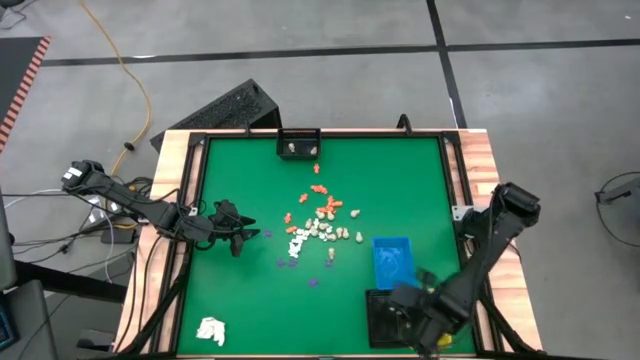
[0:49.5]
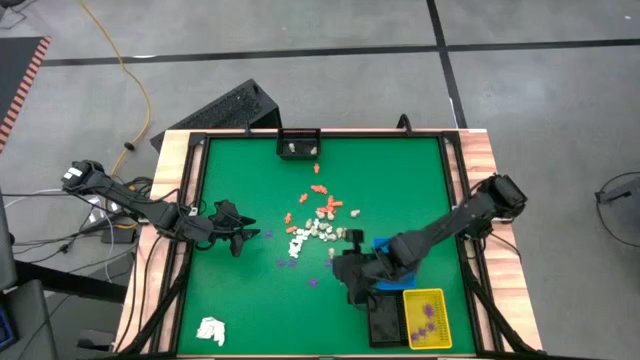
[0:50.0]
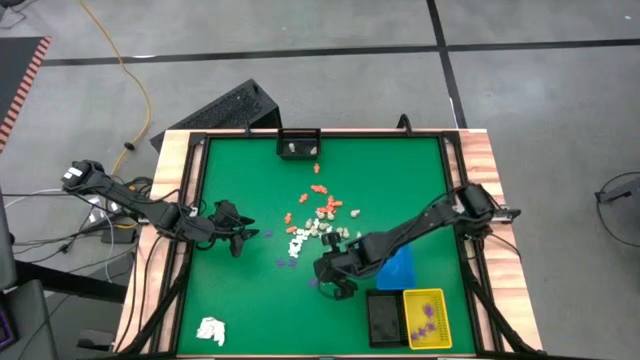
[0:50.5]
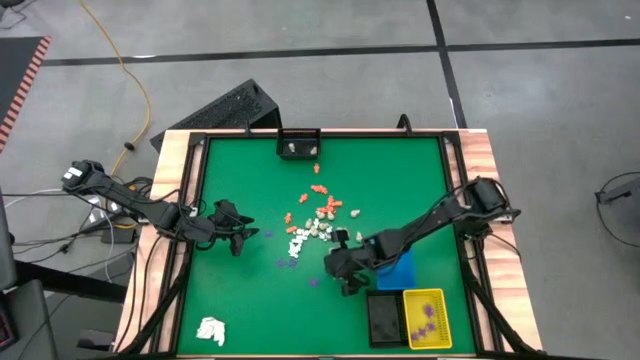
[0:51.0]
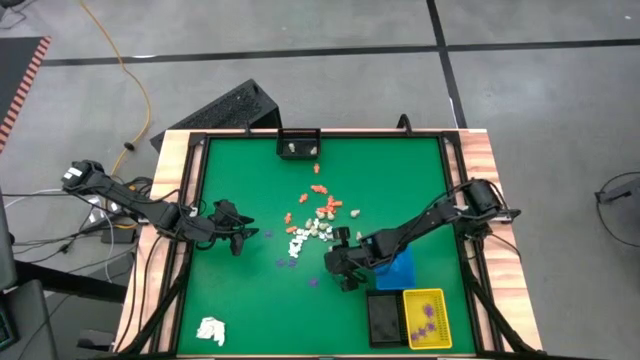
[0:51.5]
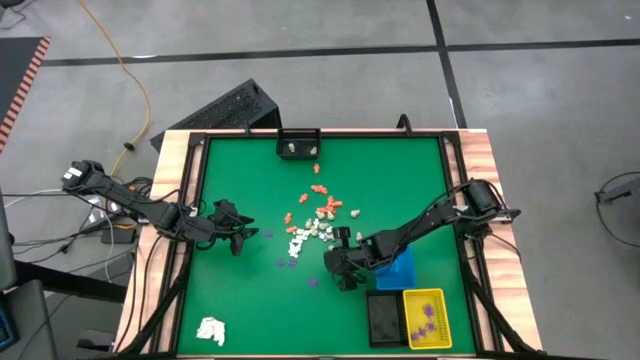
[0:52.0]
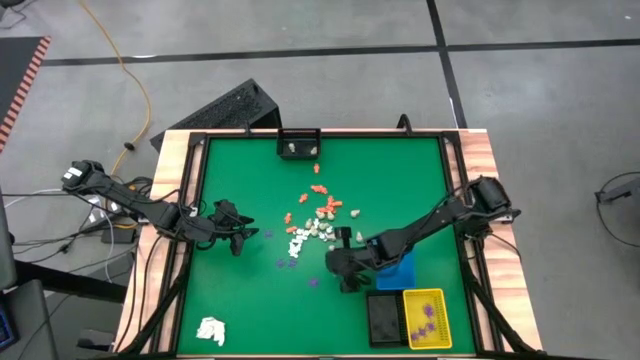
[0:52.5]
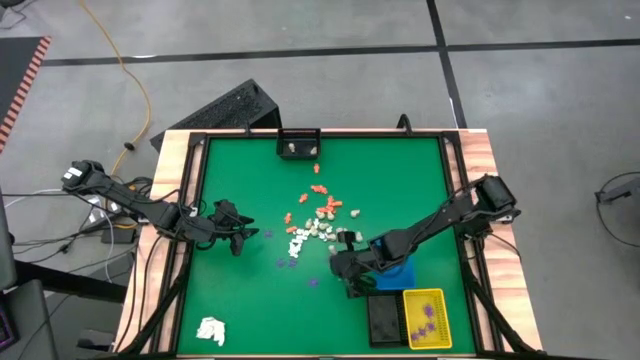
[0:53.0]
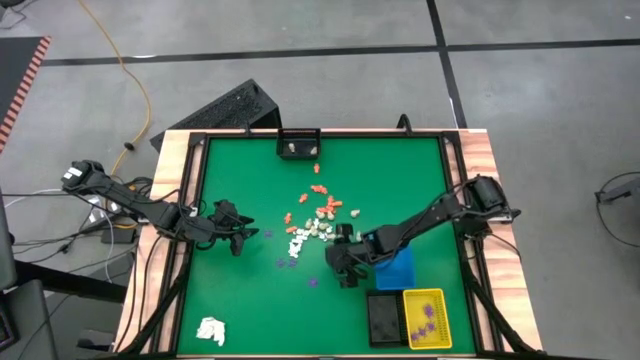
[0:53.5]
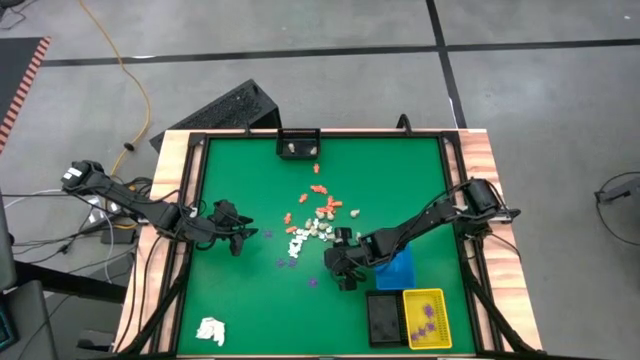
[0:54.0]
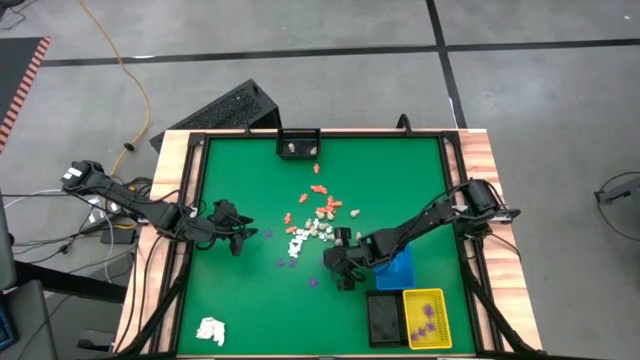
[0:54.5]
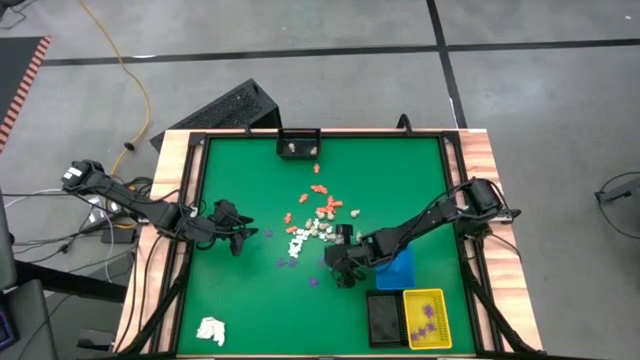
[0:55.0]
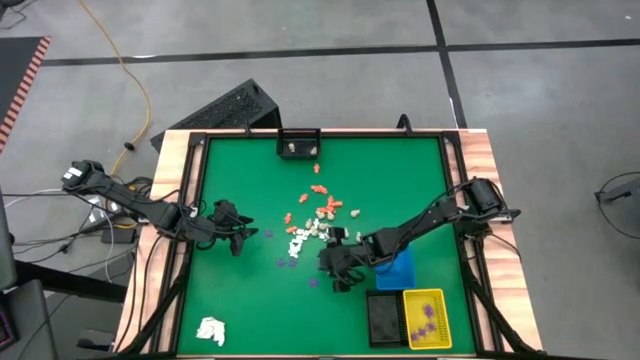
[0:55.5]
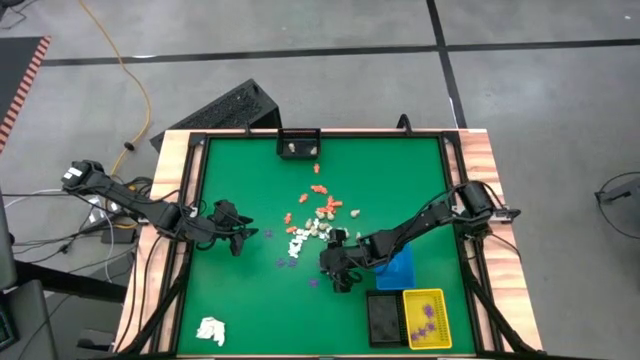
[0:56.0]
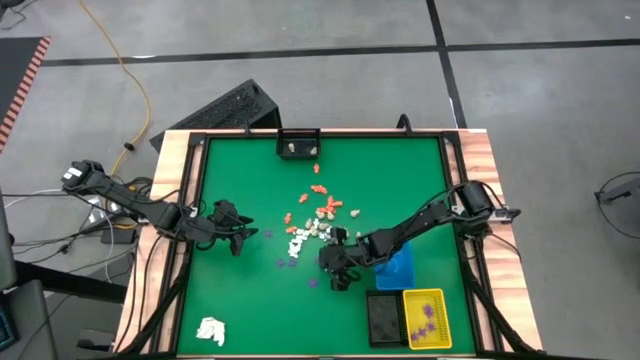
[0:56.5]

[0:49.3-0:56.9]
Task: Sort Halloween decoration
Put the purple spider toy into the yellow bin

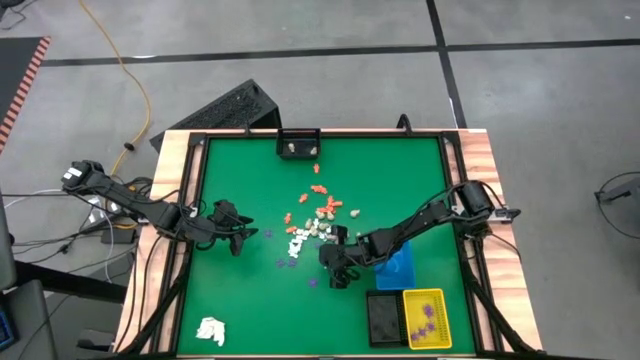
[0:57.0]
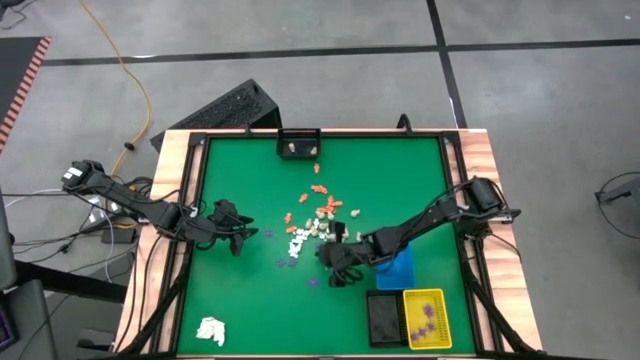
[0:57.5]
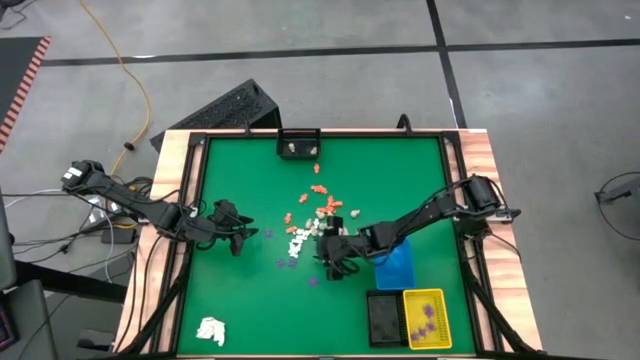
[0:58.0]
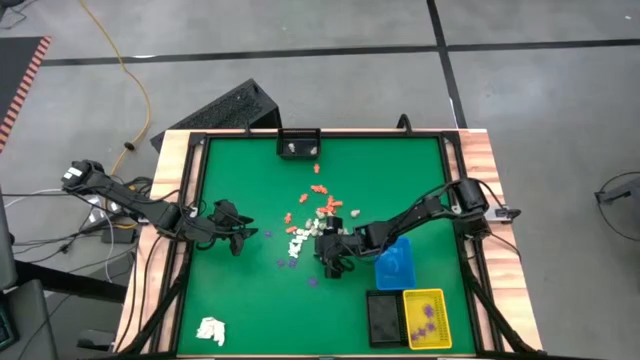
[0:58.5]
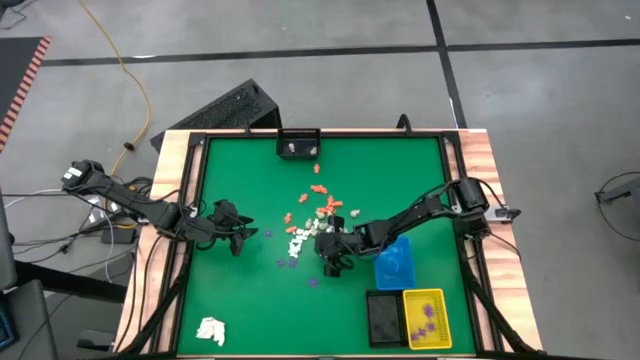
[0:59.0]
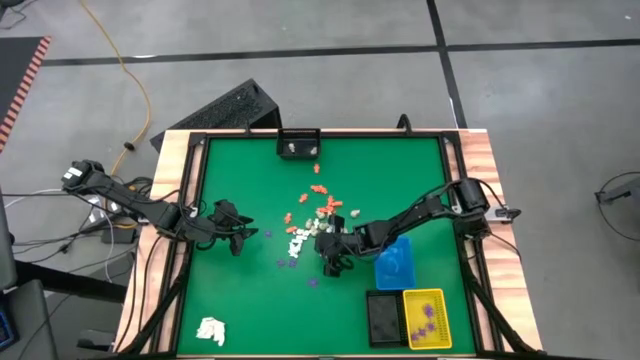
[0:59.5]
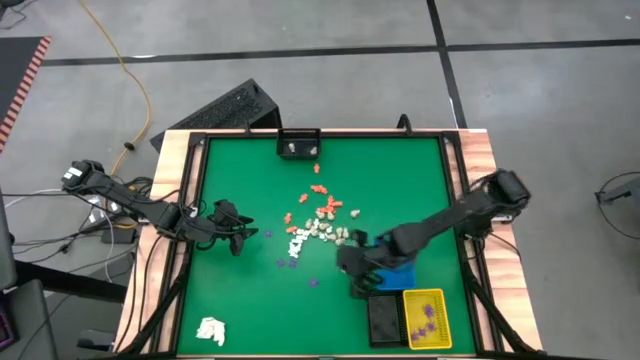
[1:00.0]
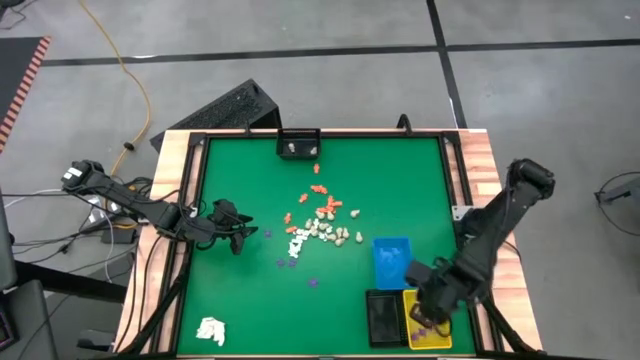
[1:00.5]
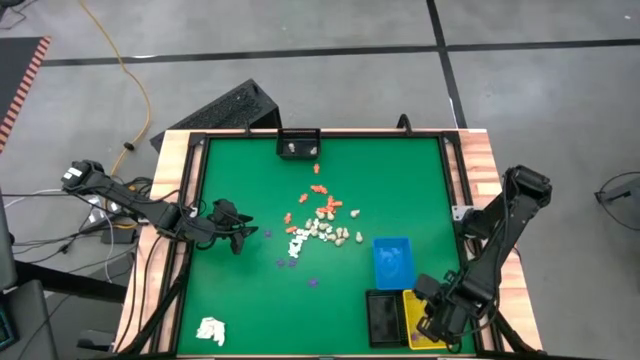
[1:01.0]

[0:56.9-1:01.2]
Put the purple spider toy into the yellow bin

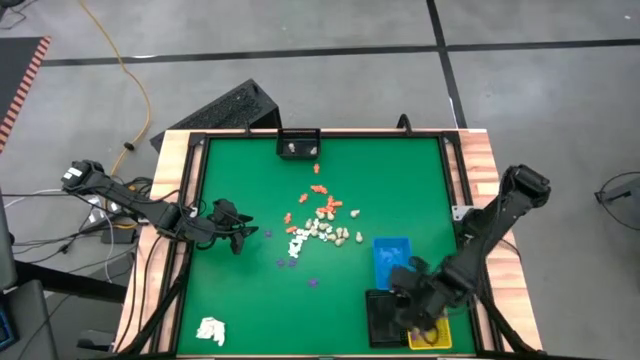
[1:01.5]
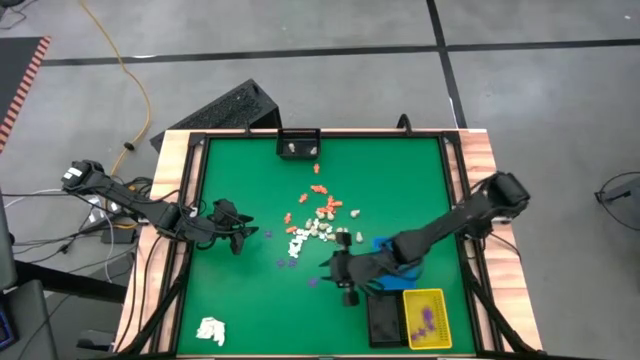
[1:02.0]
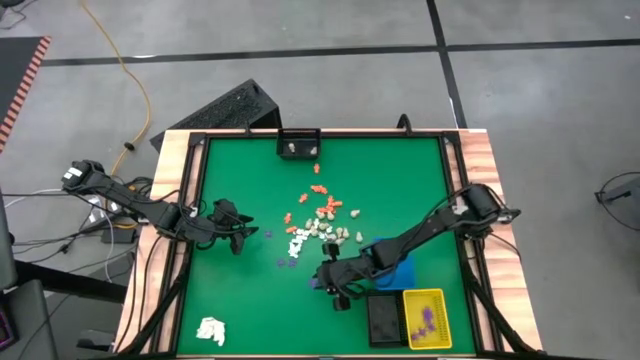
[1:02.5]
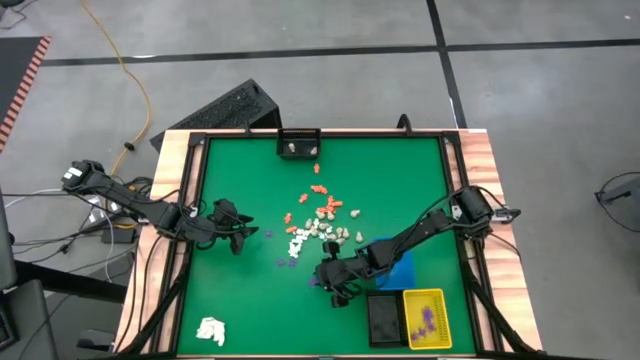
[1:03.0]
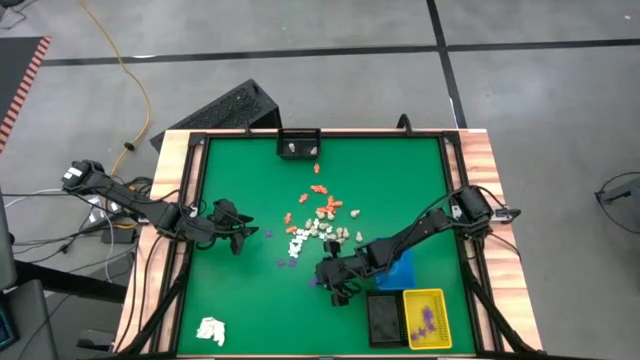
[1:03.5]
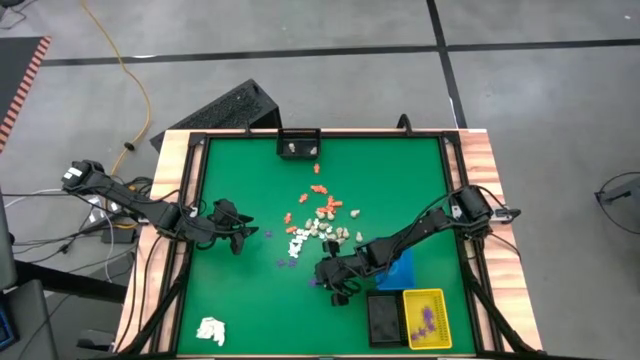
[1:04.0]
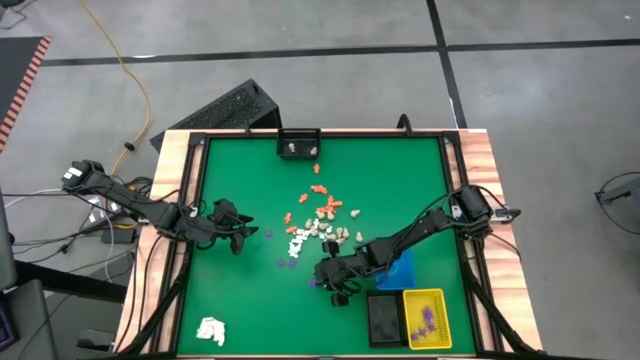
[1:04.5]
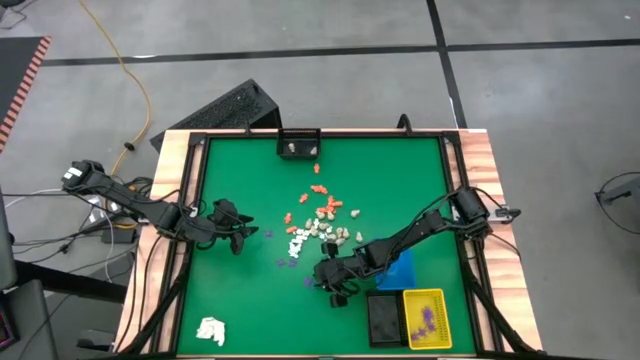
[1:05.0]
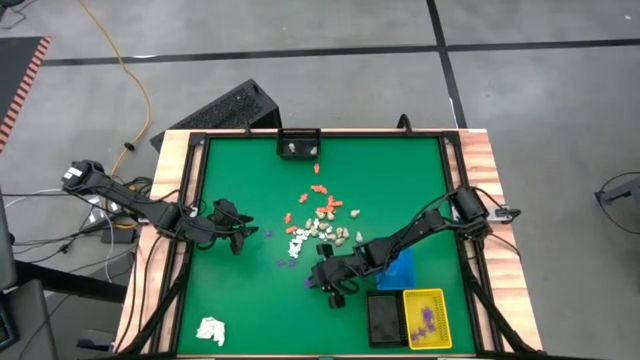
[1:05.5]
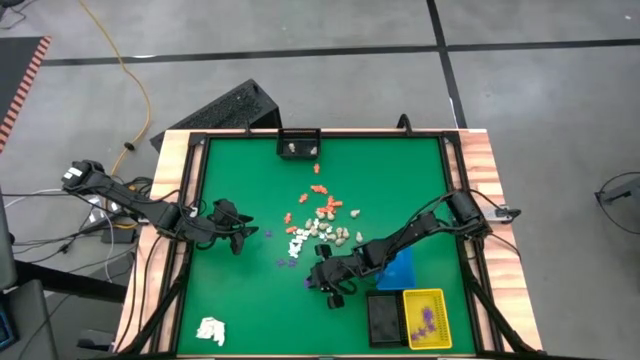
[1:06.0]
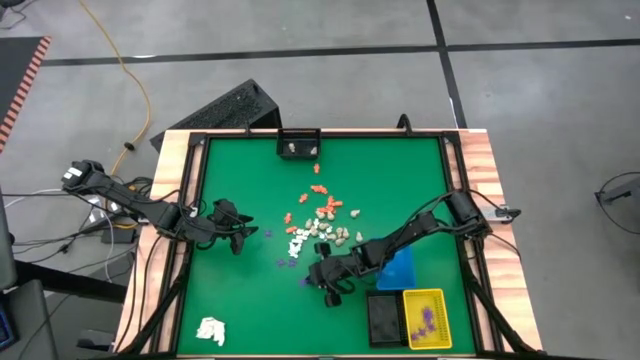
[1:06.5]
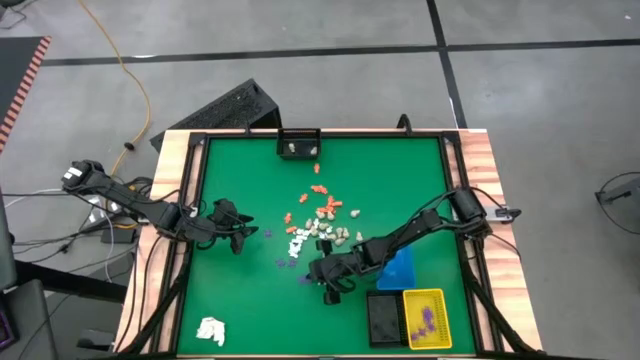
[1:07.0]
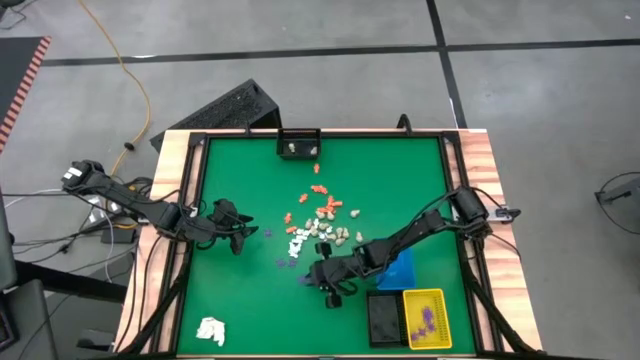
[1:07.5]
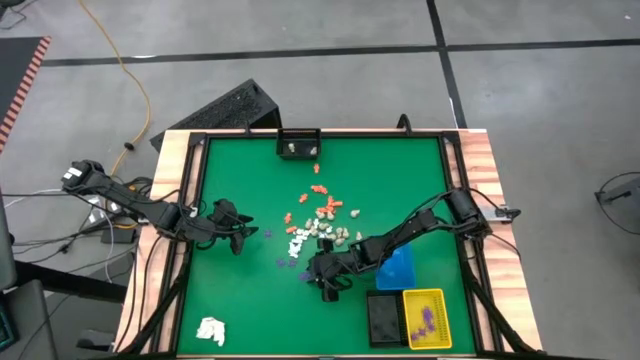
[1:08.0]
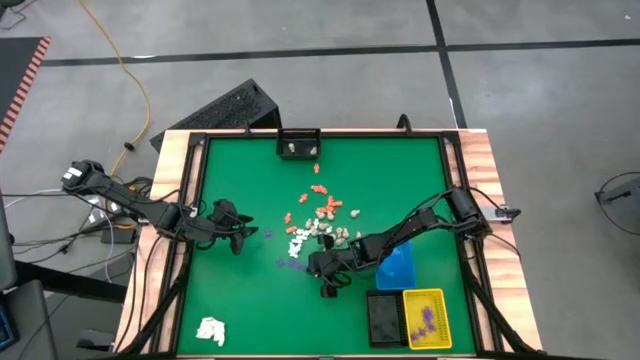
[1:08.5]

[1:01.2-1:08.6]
Put the purple spider toy into the yellow bin

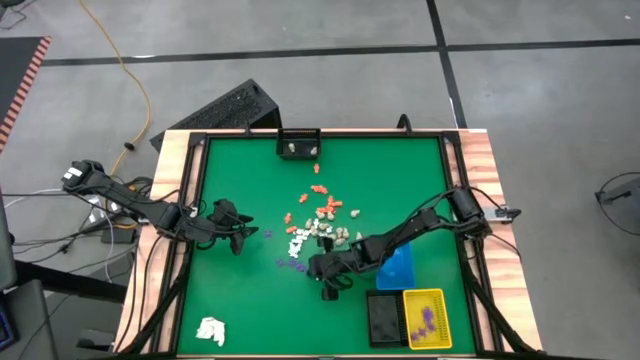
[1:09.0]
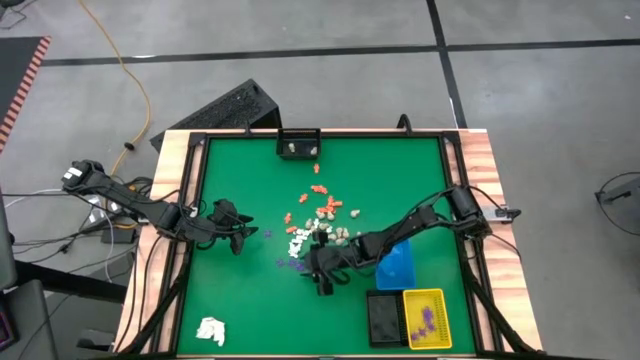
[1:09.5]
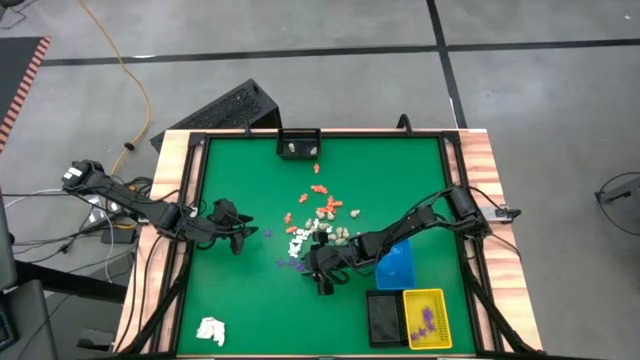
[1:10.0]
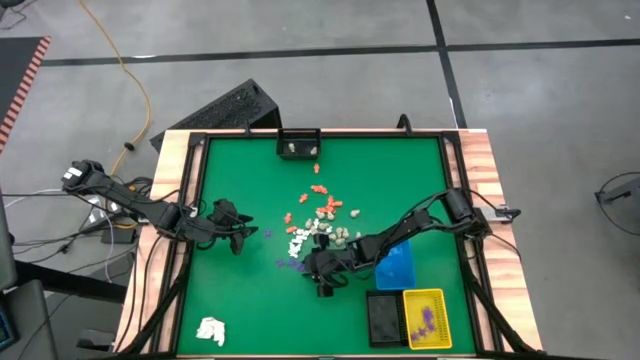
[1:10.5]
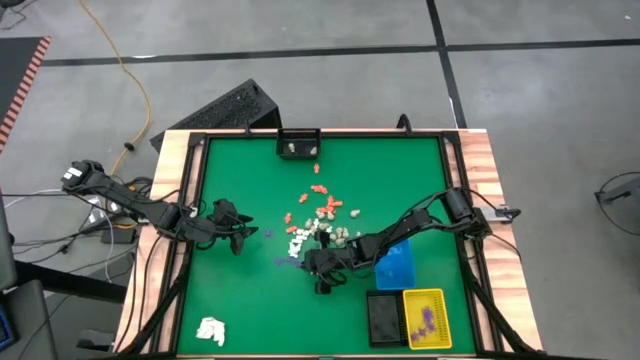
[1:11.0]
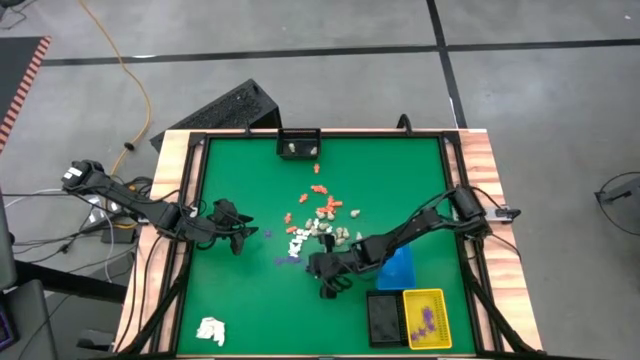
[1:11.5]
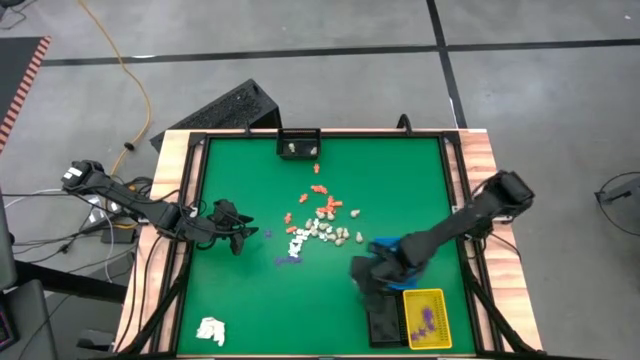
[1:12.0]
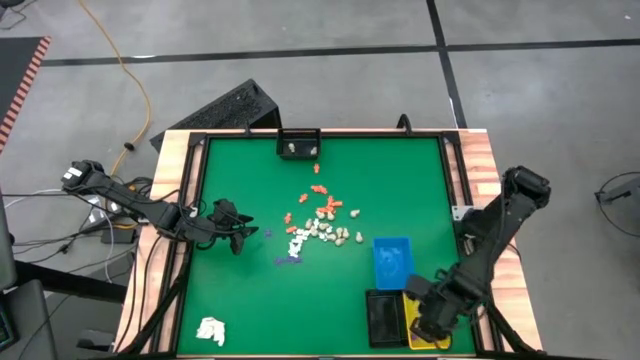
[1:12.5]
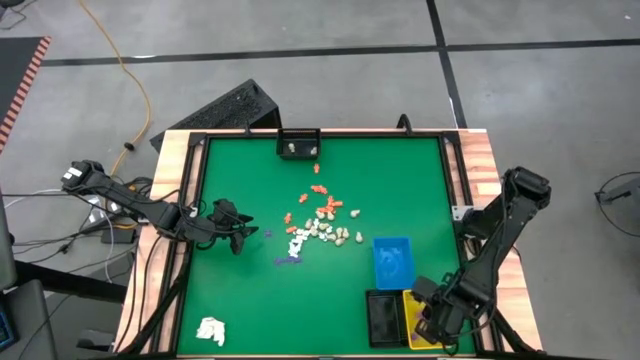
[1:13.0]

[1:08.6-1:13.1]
Put the purple spider toy into the yellow bin
